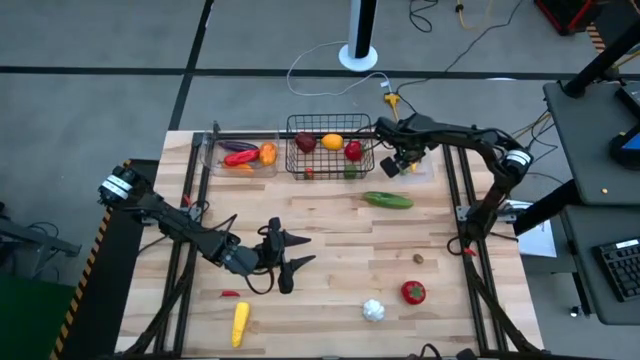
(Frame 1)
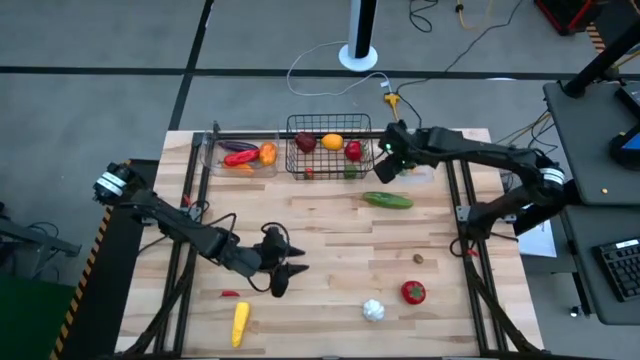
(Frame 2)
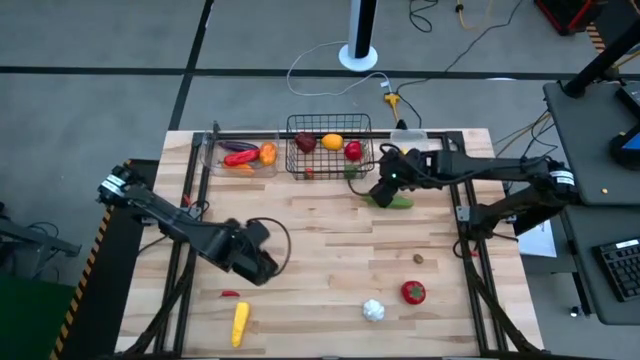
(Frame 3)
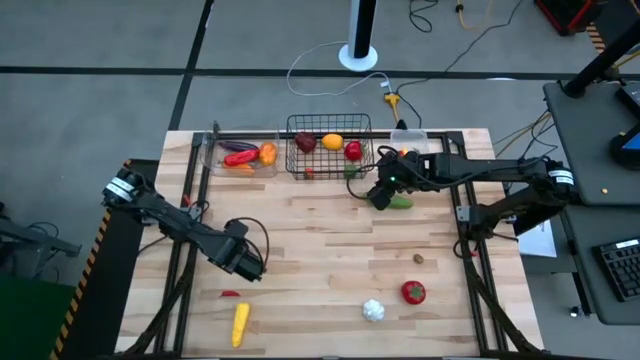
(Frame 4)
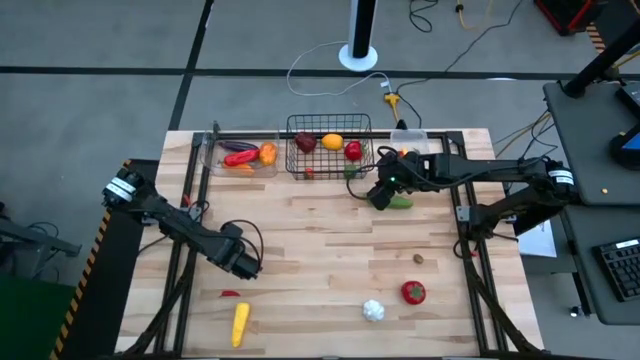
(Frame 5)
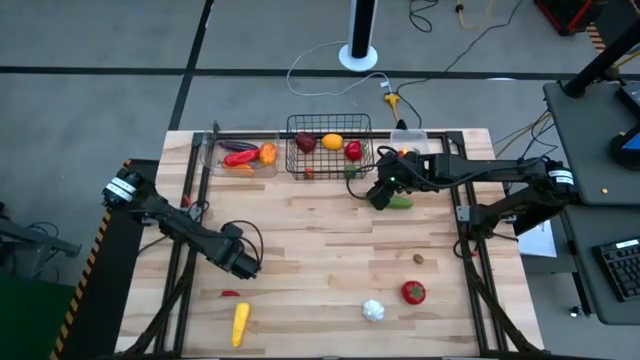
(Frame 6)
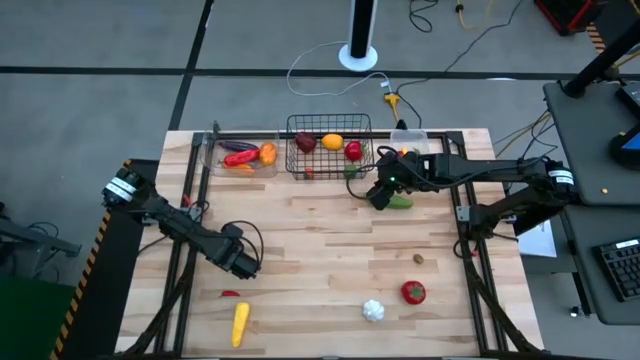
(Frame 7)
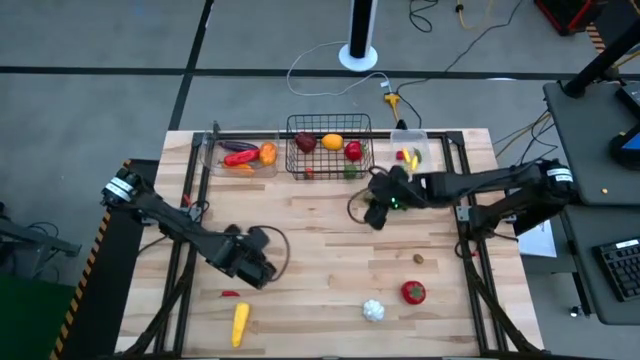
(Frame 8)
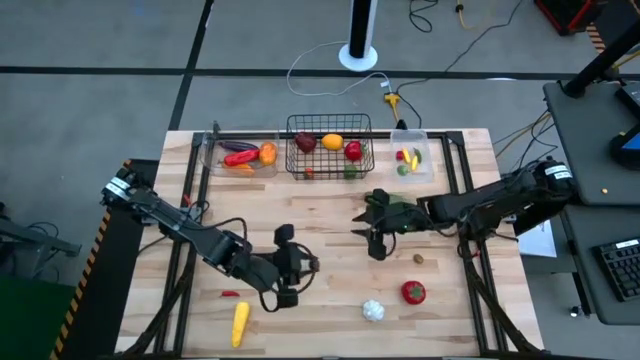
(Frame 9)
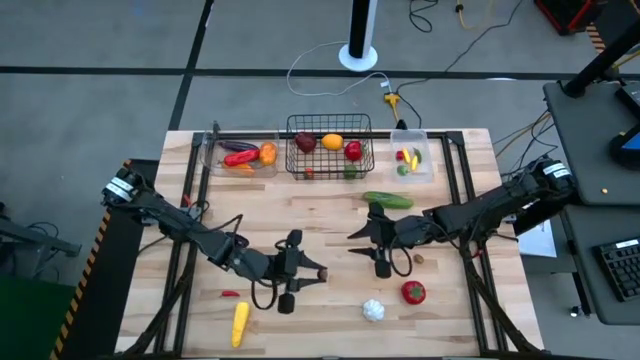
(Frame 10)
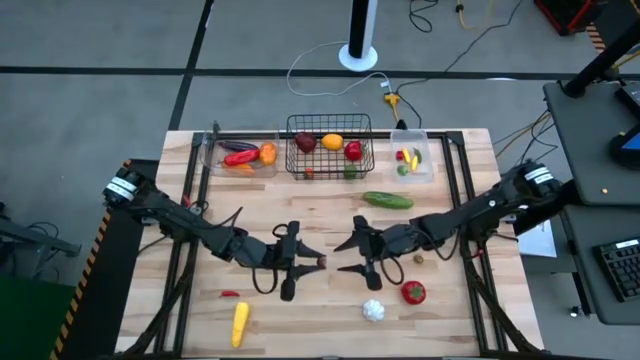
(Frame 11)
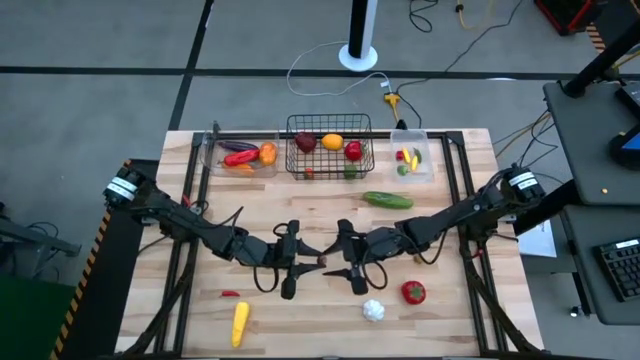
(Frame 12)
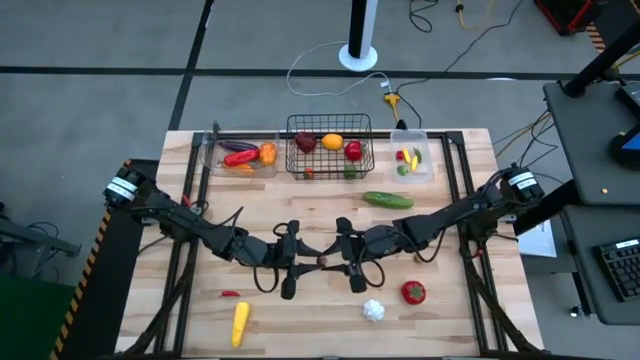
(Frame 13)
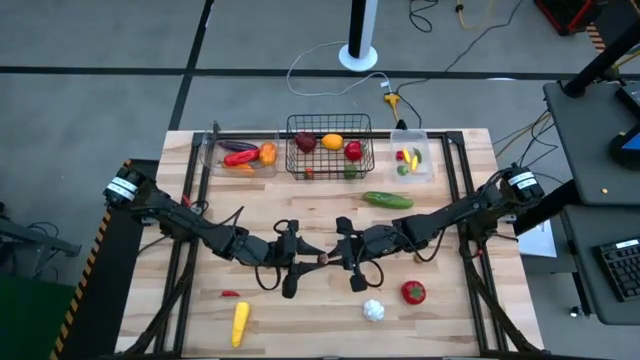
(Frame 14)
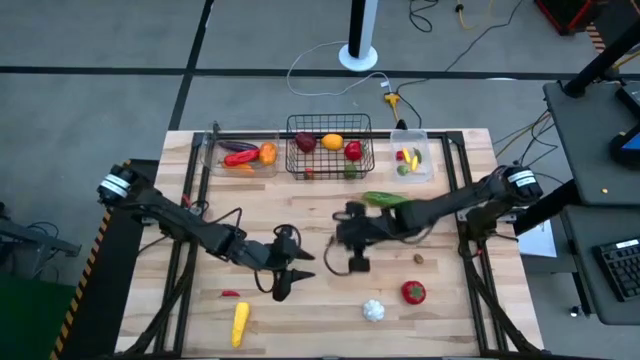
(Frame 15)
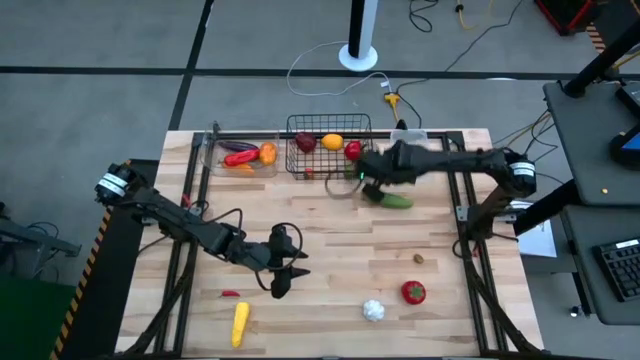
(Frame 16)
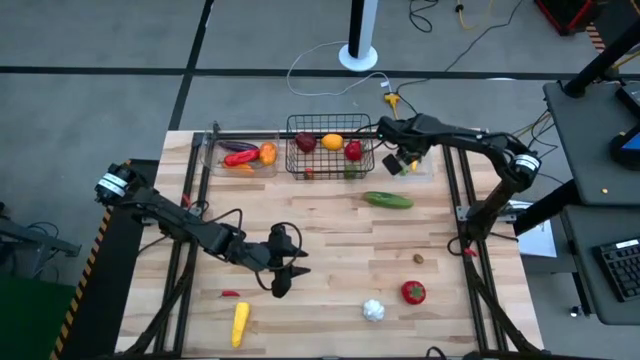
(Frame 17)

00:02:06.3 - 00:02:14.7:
Task: Sort produce into baskets
Put the baby bella mushroom into the white bin

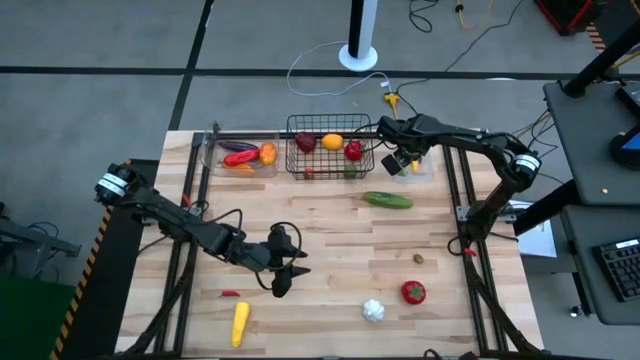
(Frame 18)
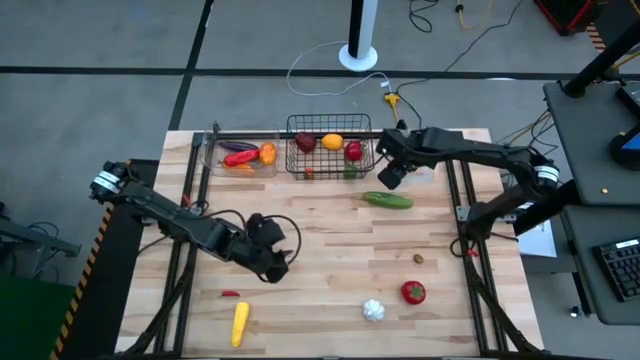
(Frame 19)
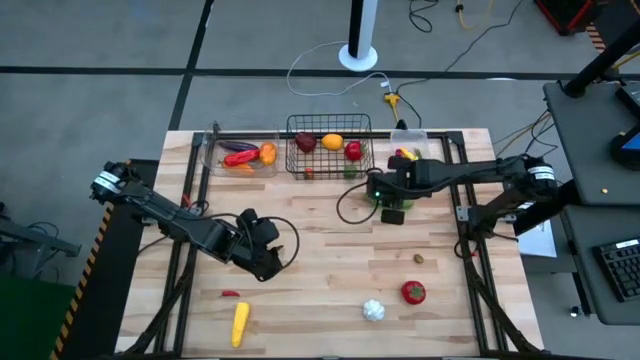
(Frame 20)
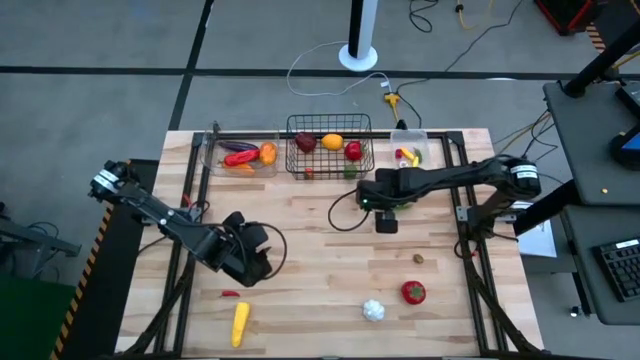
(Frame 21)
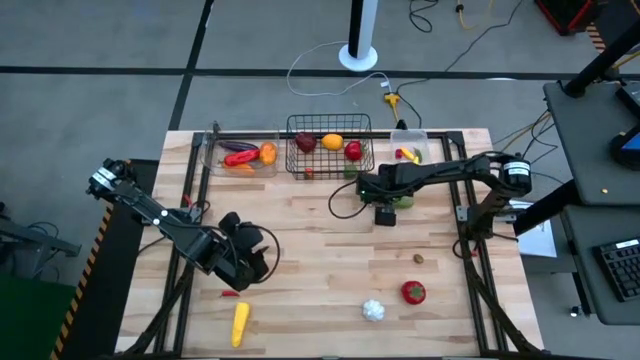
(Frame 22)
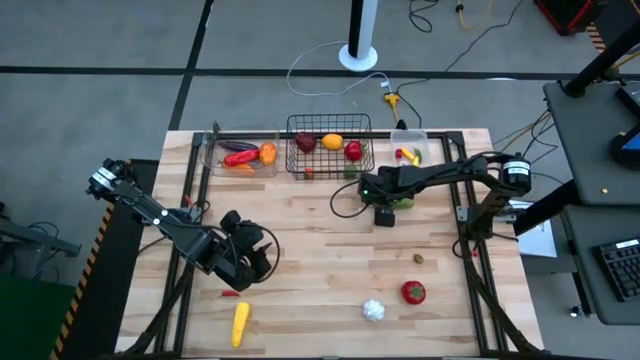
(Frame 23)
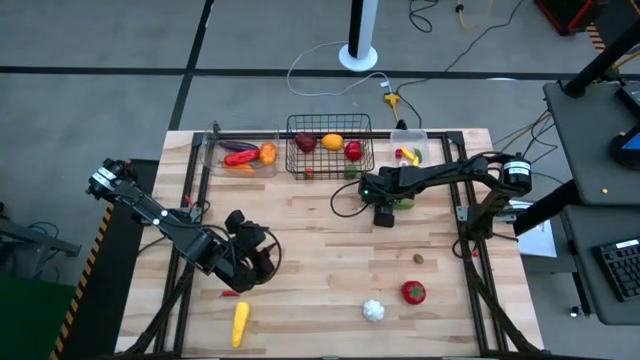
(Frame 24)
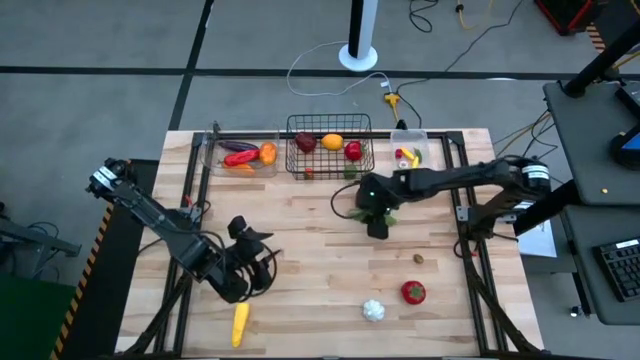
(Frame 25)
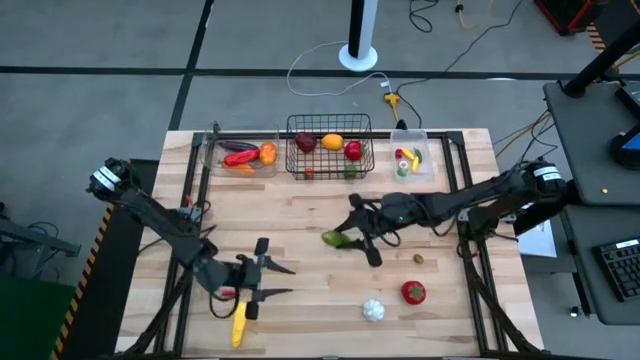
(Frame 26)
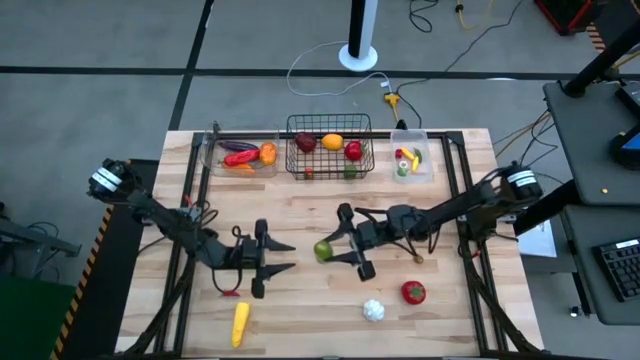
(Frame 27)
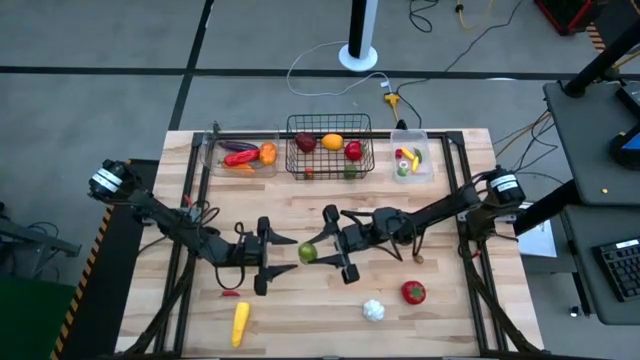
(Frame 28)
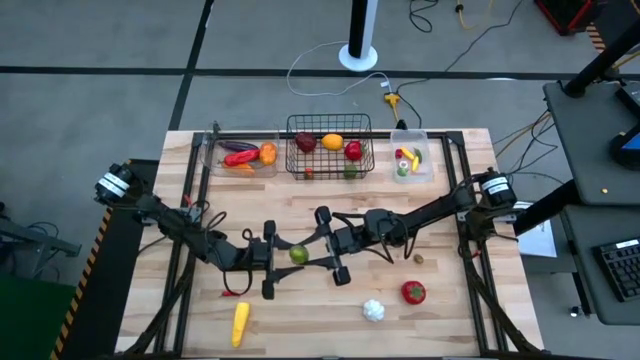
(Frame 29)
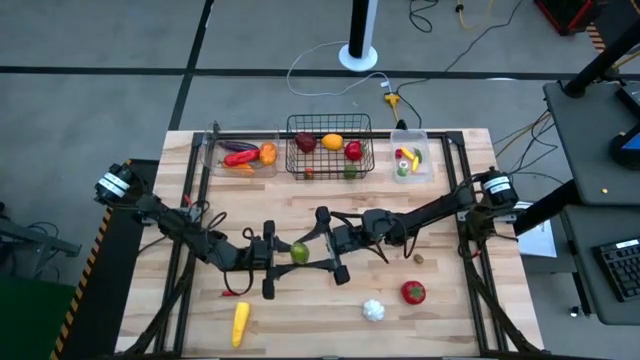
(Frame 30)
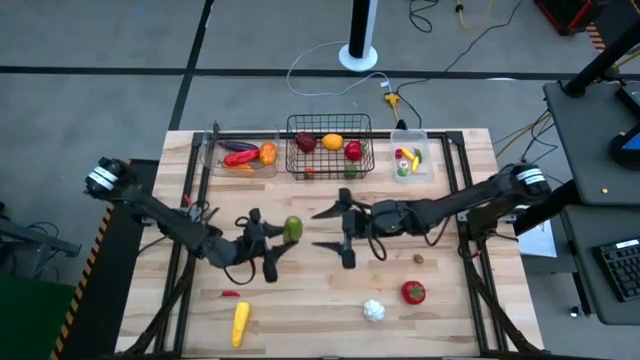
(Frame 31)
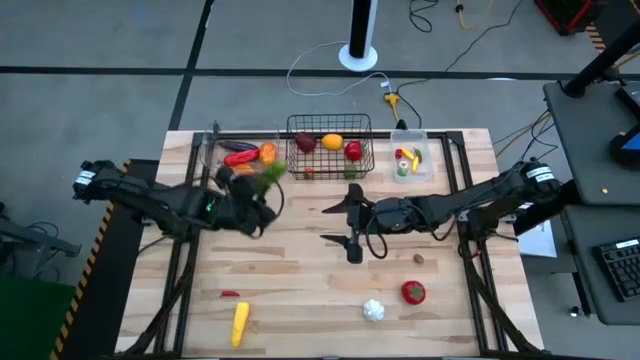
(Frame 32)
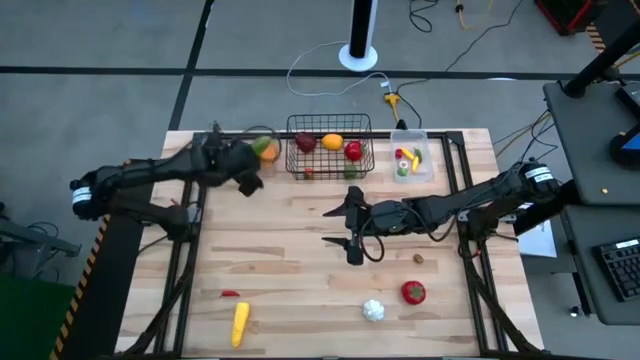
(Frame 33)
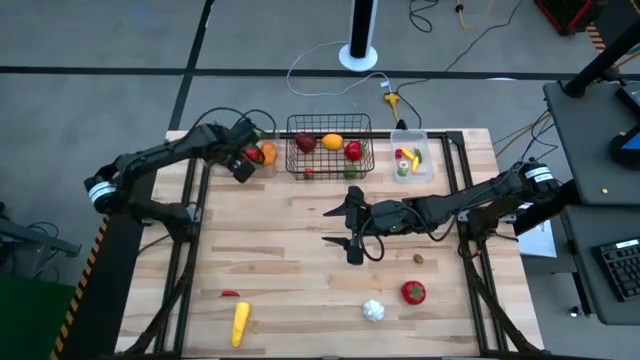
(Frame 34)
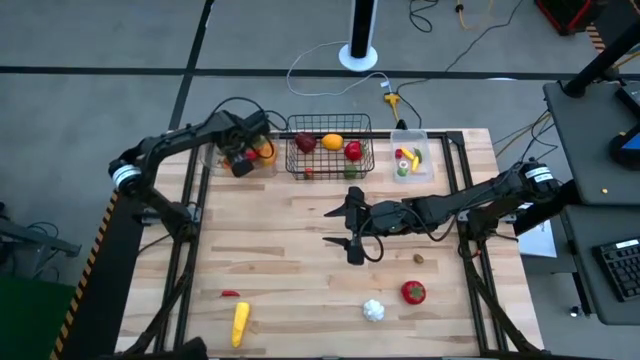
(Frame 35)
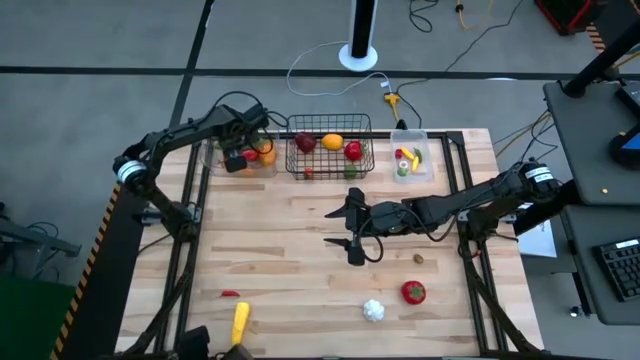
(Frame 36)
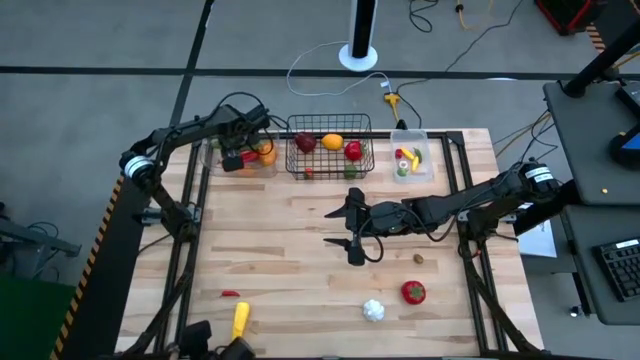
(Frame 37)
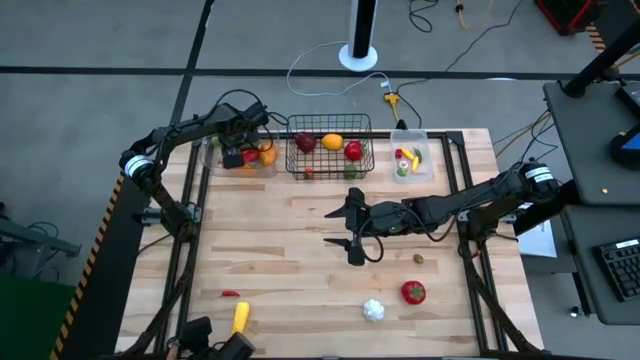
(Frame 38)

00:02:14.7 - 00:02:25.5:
Put the cucumber into the clear bin

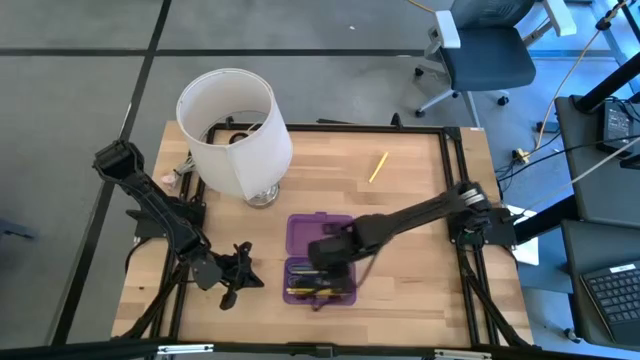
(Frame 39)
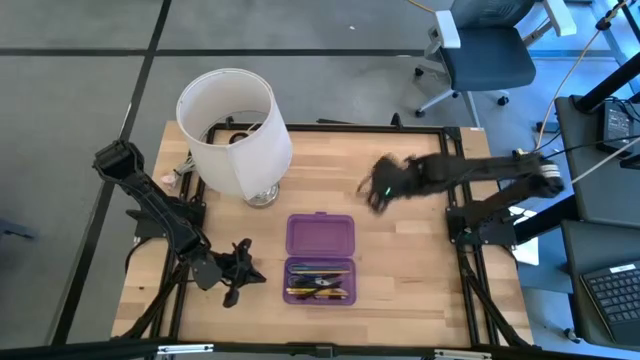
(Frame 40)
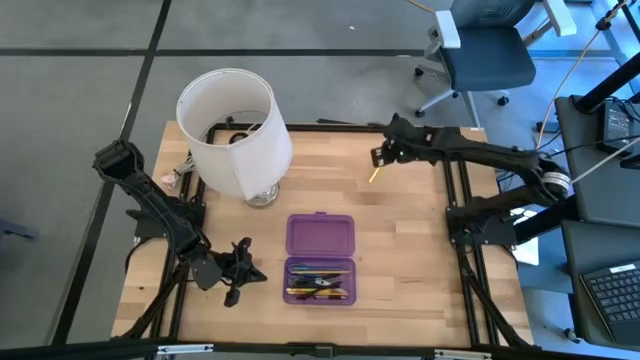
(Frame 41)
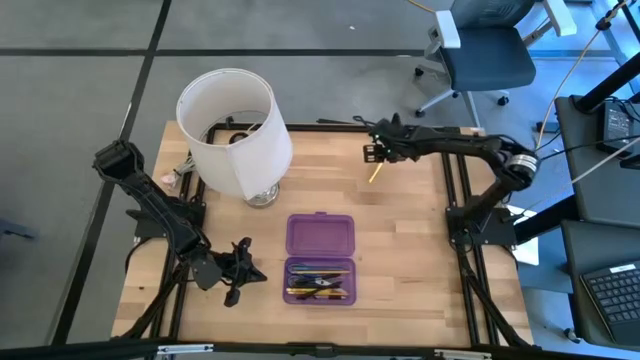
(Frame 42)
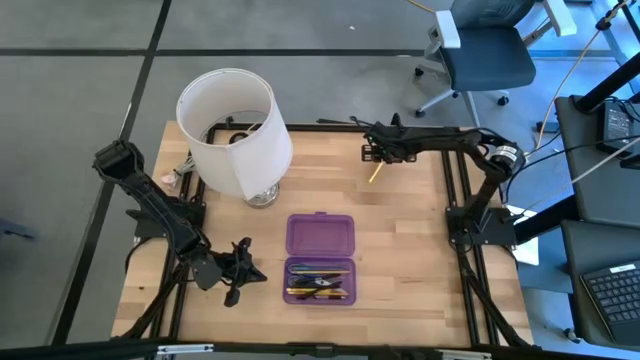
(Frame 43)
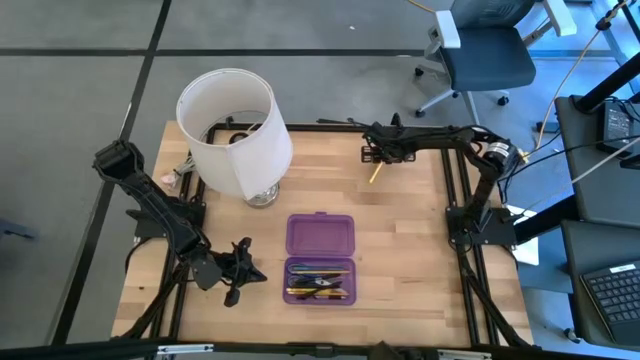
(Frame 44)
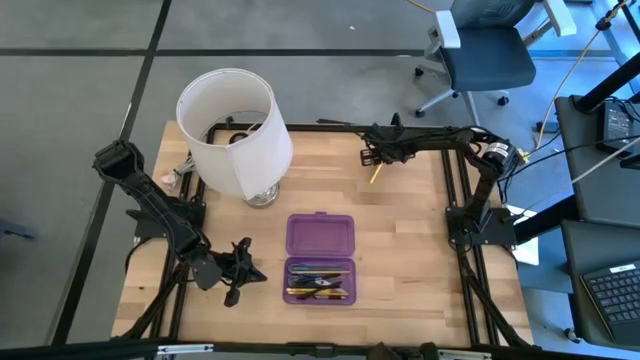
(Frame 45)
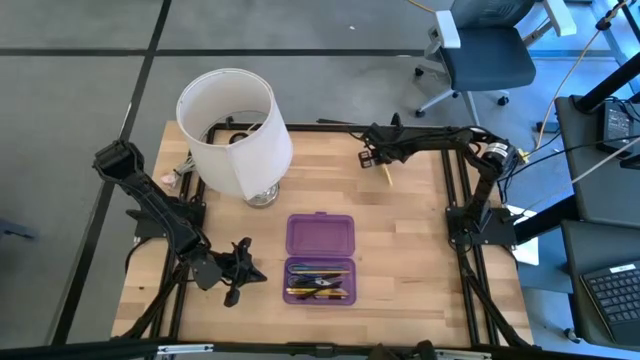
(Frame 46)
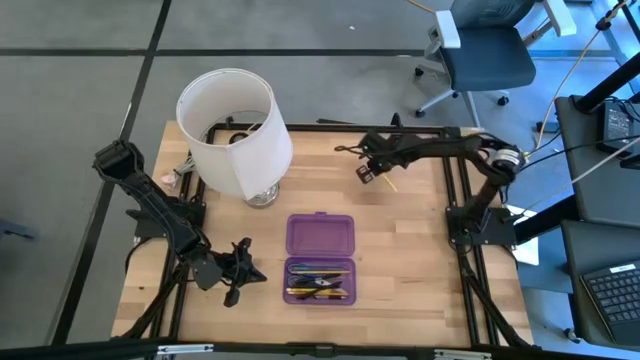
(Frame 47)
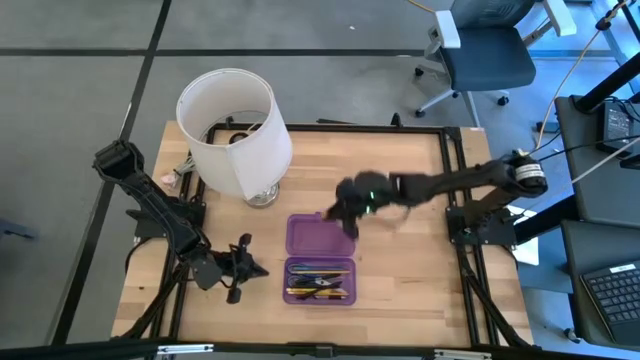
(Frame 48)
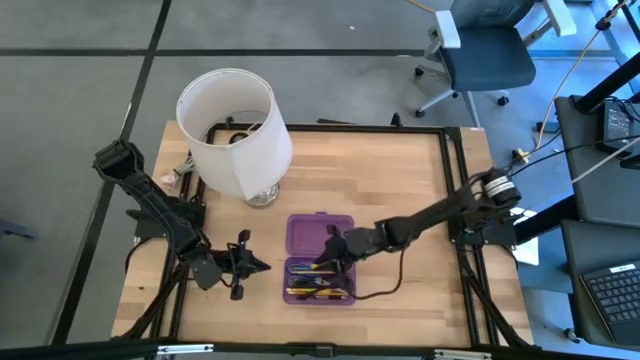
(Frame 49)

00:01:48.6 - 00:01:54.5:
Task: Pick & place school supplies into a supply box
Put the yellow pen into the purple supply box
